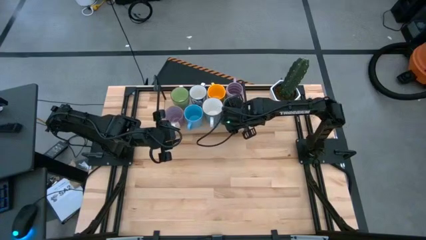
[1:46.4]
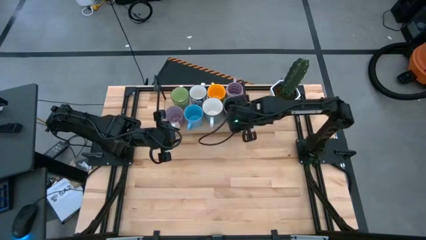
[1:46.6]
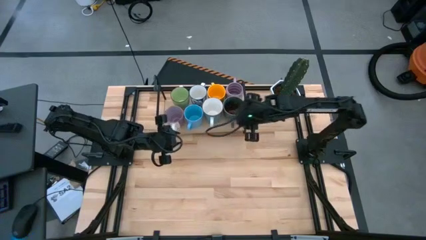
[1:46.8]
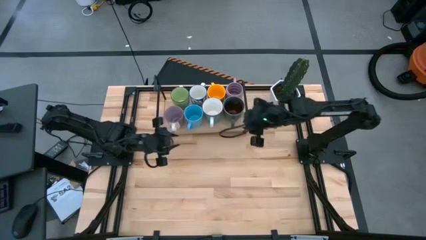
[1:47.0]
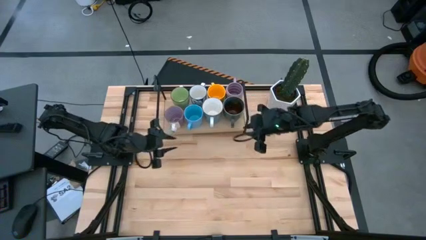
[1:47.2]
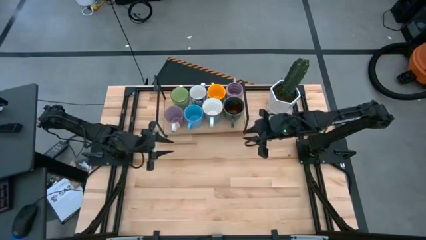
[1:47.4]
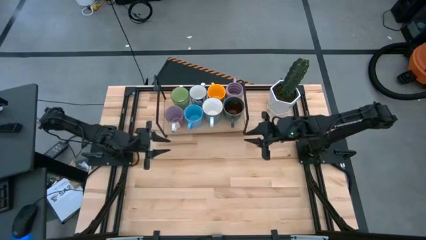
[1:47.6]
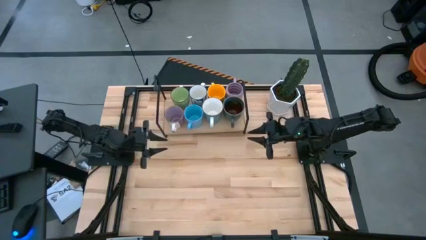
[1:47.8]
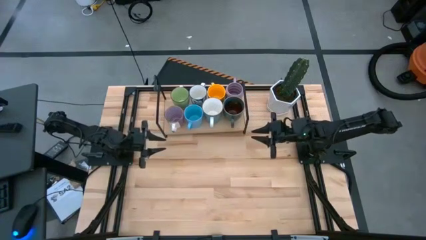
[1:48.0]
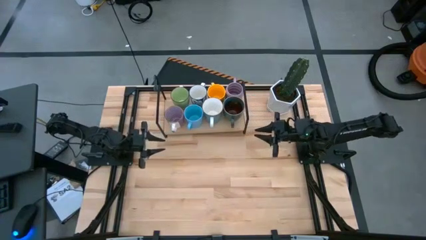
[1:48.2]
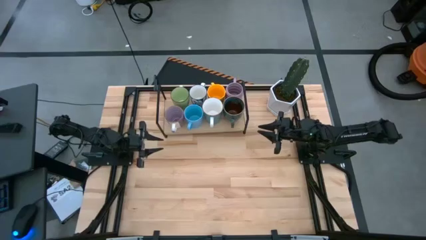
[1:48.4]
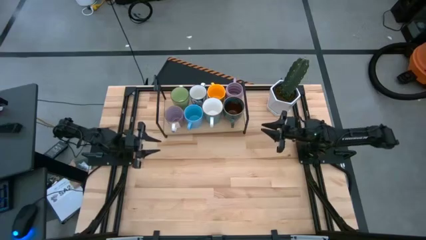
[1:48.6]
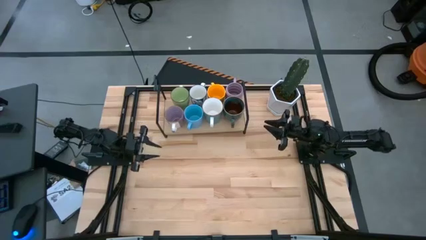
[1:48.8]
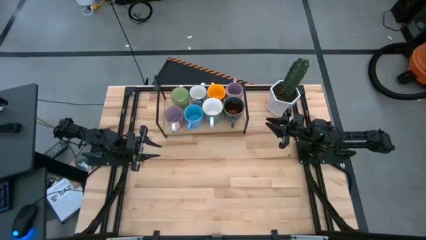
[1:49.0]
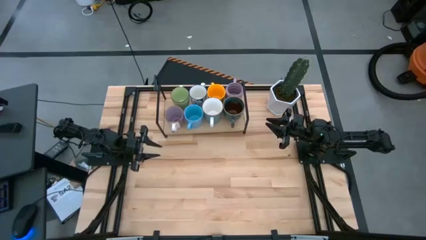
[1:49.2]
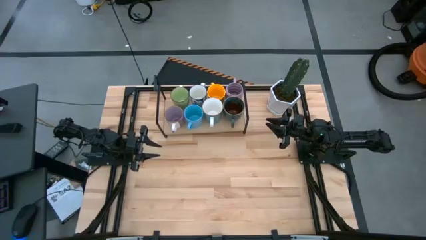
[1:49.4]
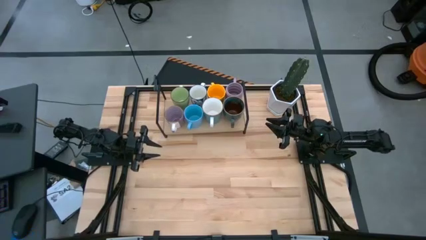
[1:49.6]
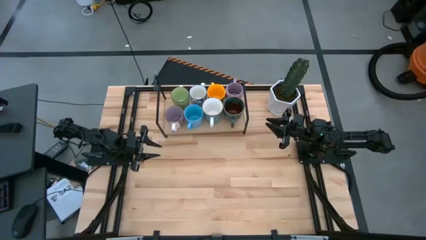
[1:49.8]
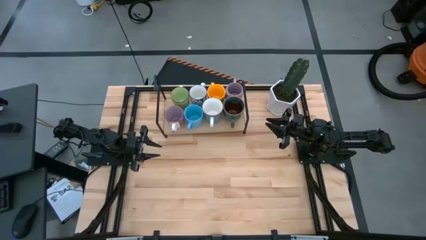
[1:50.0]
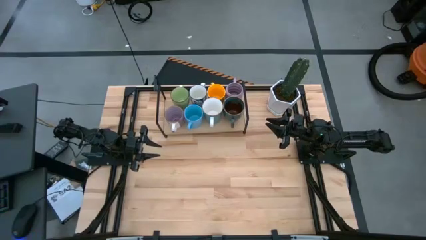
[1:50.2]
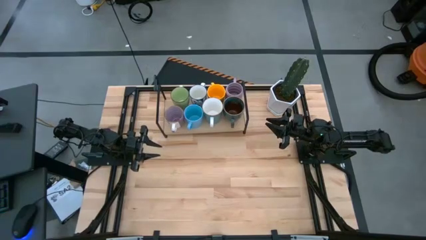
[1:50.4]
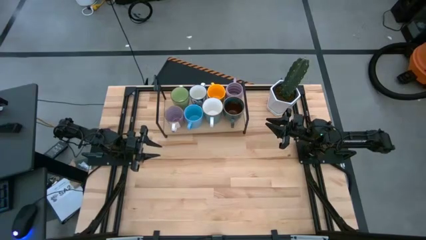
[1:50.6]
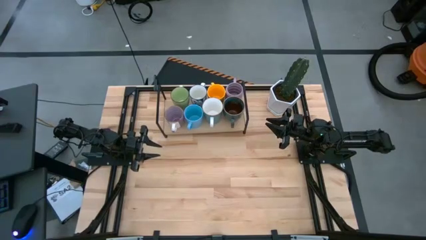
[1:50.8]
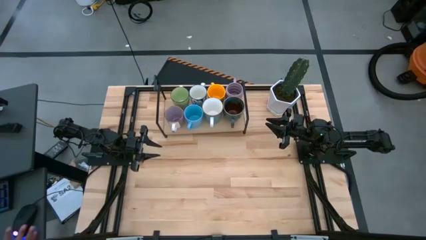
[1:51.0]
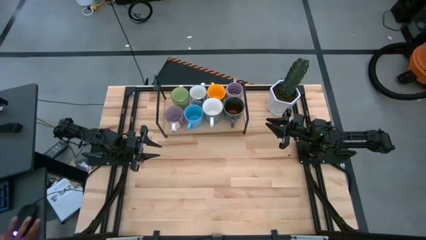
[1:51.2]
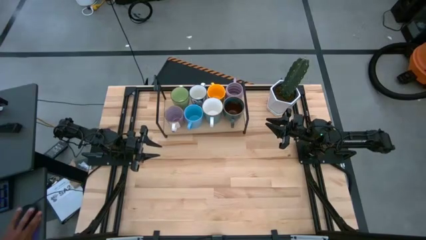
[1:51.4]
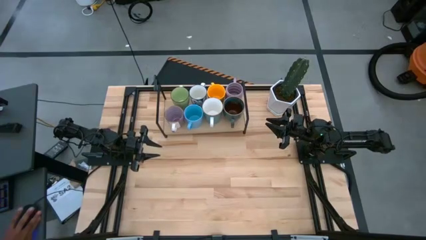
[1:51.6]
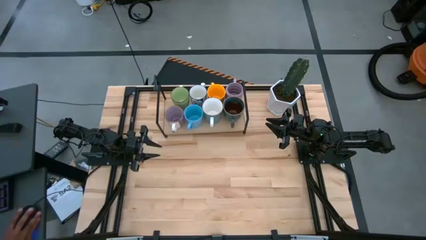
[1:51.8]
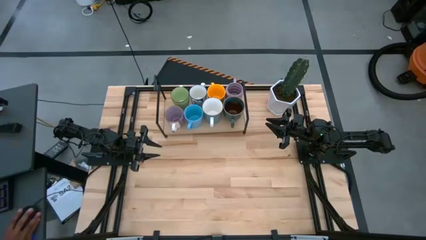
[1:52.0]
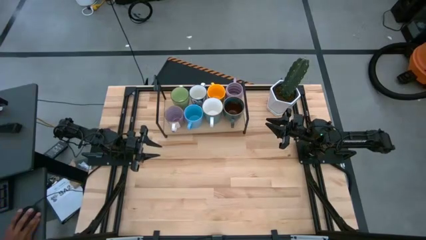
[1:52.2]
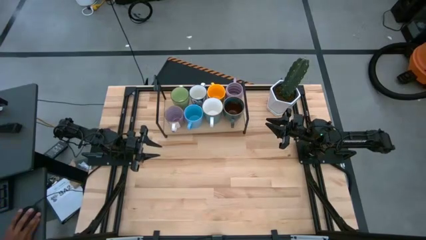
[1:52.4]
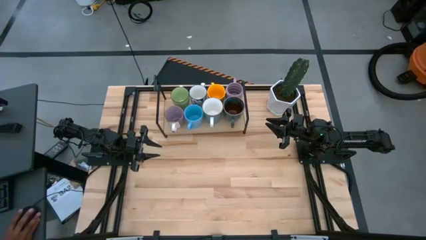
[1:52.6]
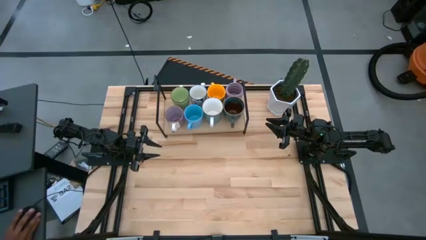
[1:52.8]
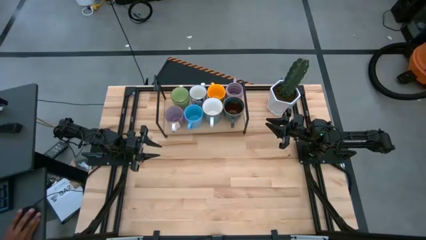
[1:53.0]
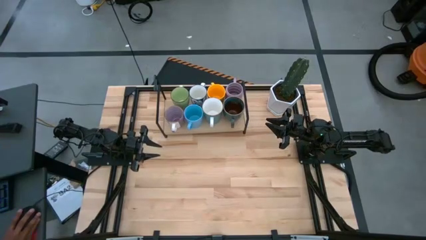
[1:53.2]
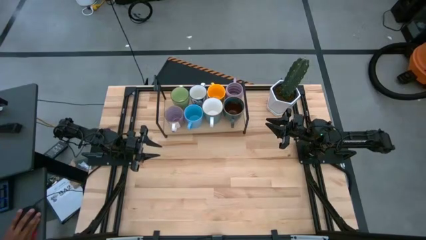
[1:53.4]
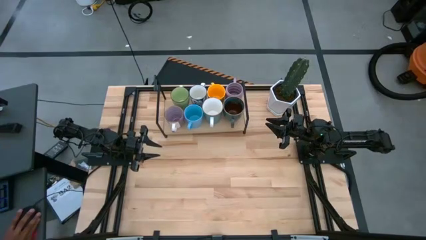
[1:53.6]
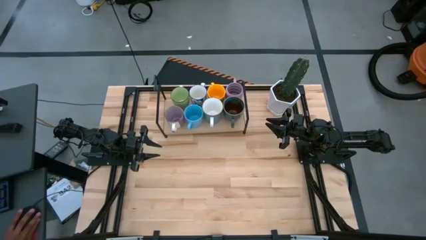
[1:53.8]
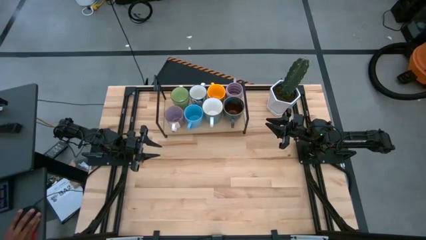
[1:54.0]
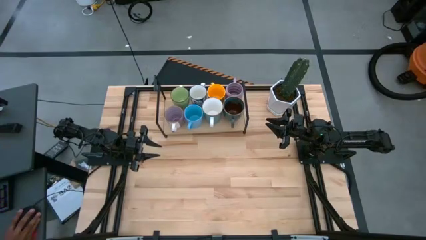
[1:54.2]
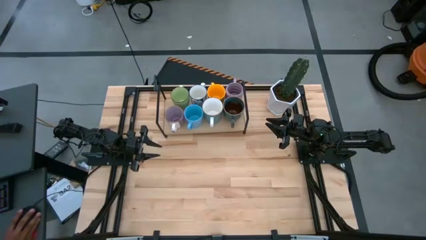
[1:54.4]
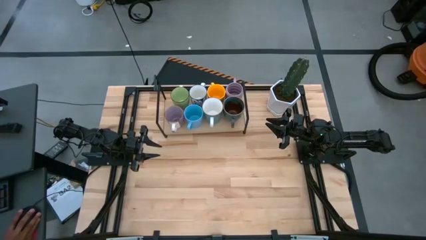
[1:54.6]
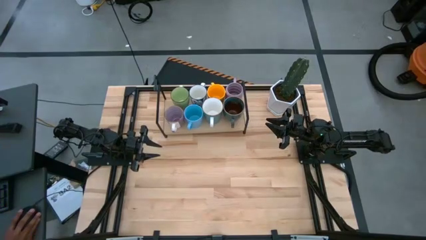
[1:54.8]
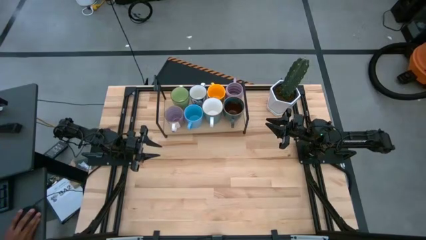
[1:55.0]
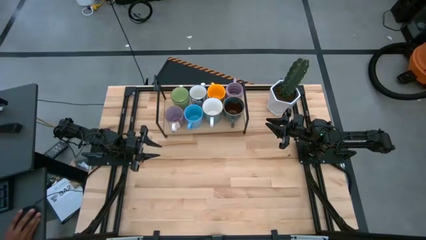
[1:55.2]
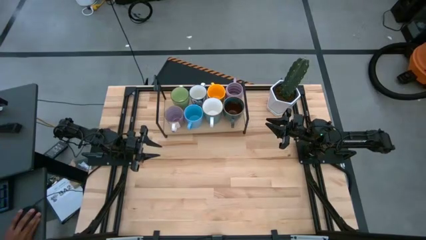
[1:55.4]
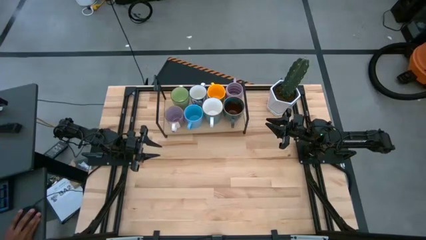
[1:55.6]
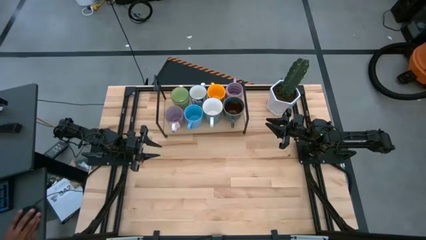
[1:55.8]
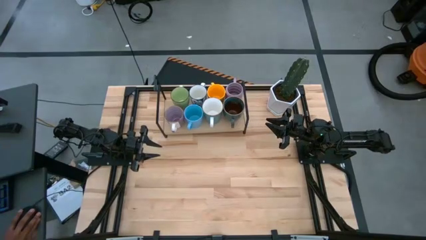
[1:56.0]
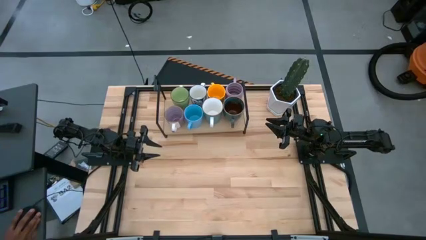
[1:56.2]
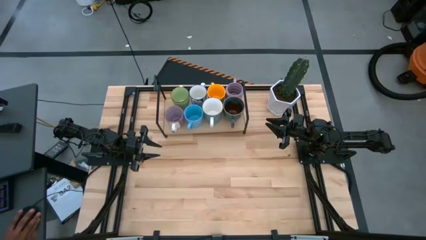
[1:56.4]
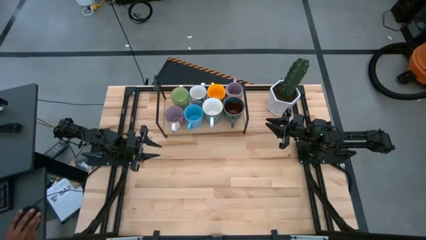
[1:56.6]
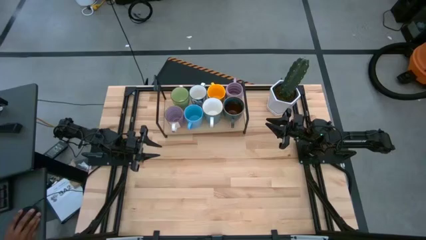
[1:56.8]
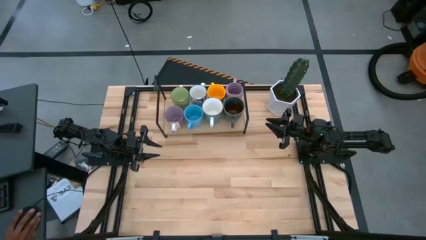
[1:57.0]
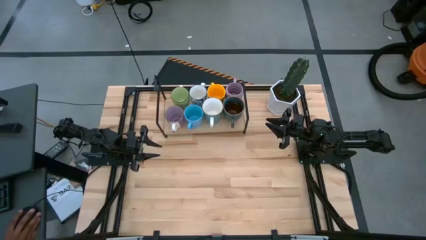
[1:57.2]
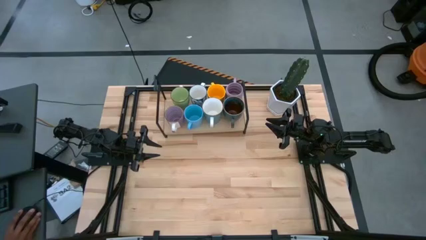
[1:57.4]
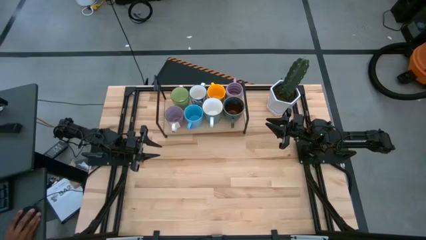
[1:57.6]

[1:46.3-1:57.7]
Task: Place coffee mugs
Return to Home Position

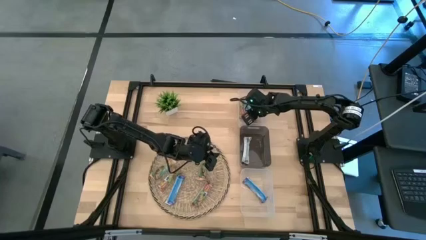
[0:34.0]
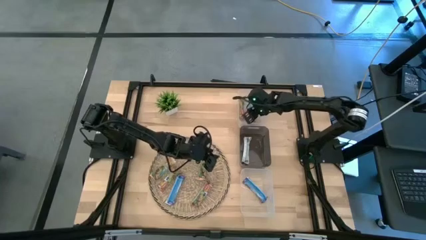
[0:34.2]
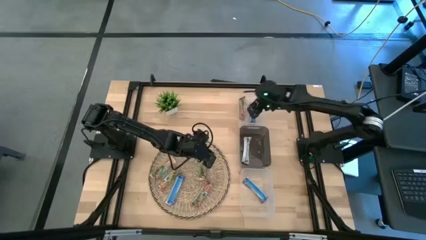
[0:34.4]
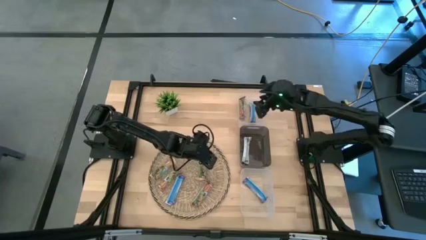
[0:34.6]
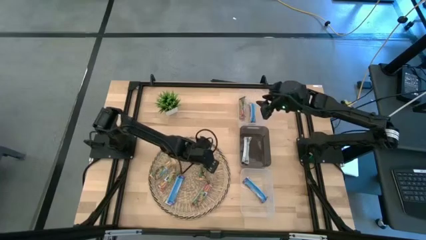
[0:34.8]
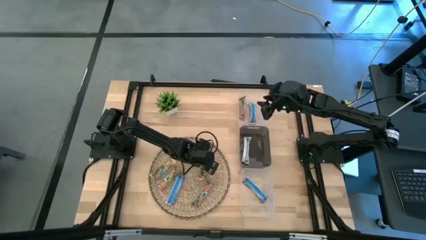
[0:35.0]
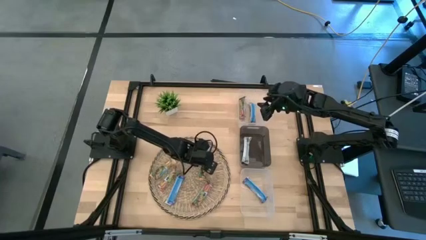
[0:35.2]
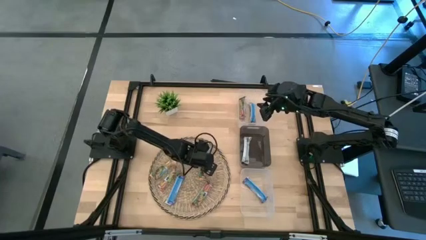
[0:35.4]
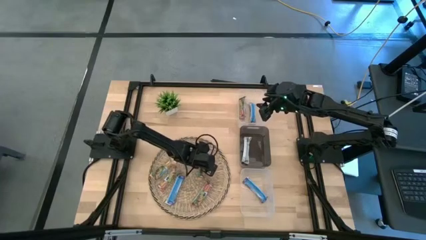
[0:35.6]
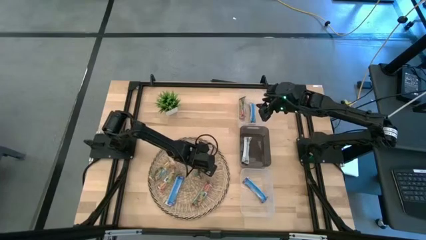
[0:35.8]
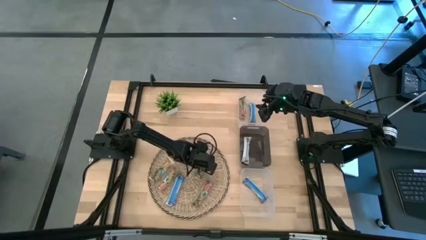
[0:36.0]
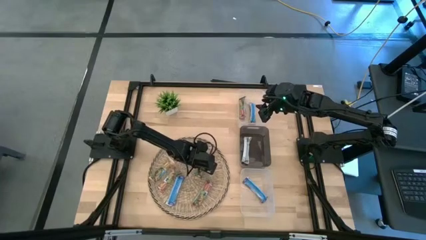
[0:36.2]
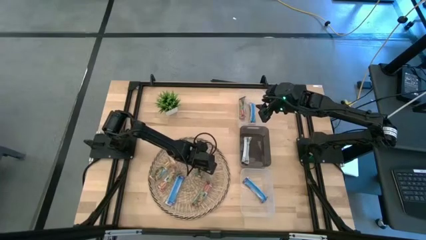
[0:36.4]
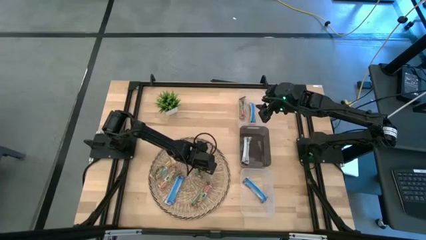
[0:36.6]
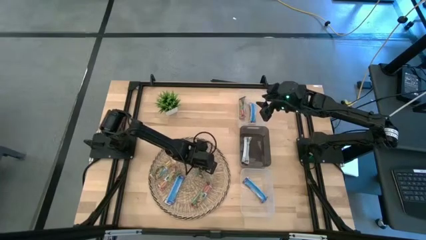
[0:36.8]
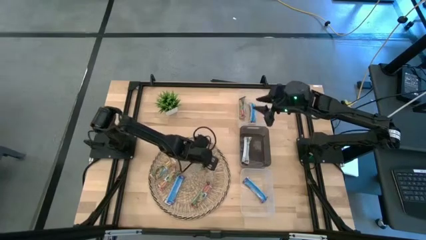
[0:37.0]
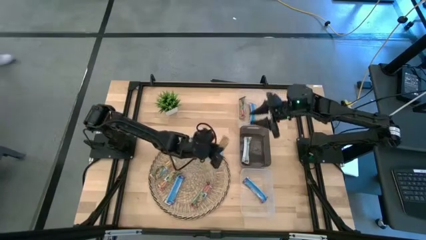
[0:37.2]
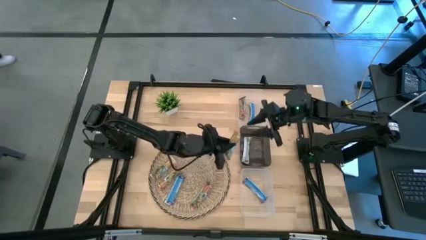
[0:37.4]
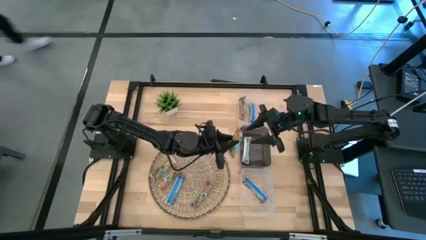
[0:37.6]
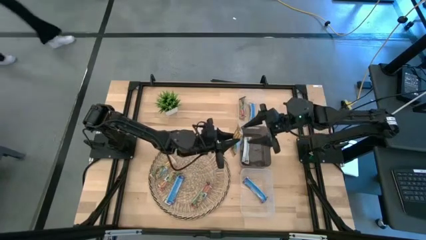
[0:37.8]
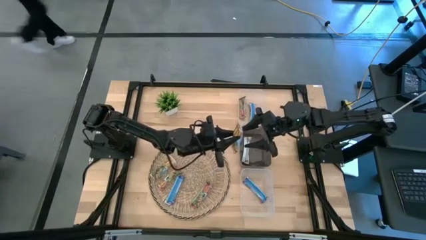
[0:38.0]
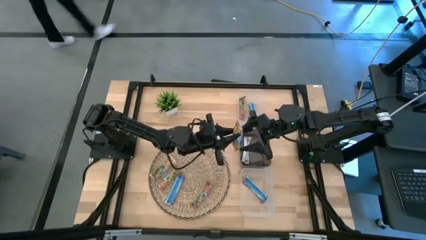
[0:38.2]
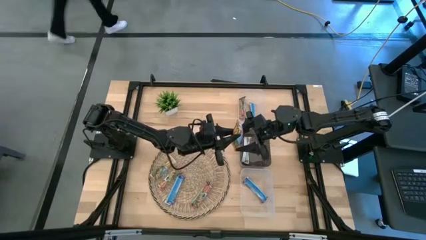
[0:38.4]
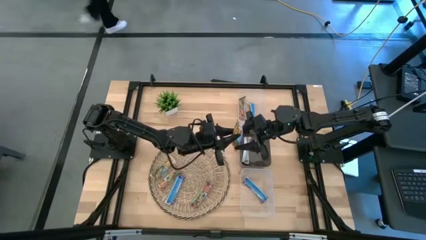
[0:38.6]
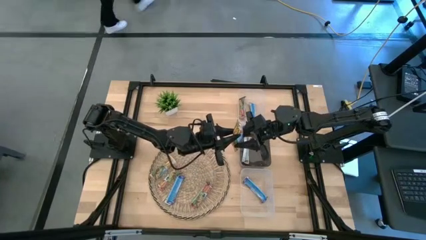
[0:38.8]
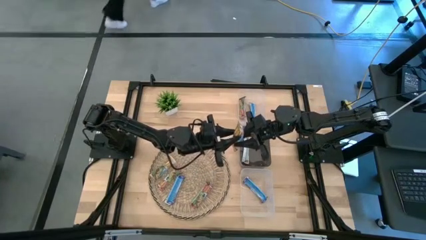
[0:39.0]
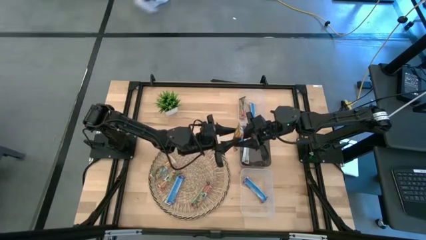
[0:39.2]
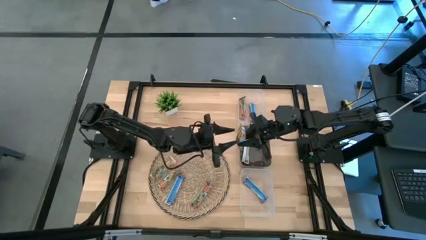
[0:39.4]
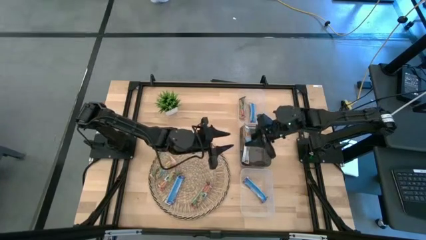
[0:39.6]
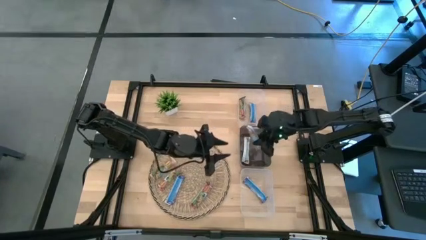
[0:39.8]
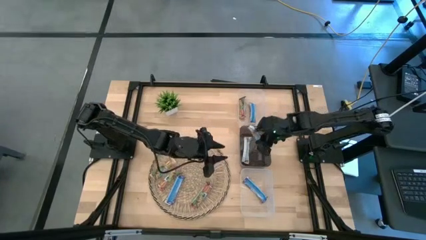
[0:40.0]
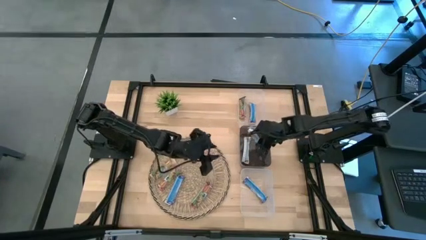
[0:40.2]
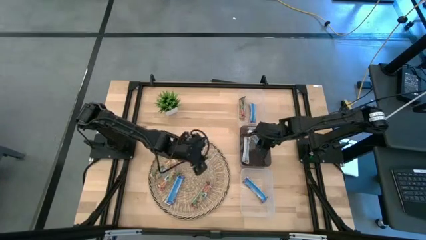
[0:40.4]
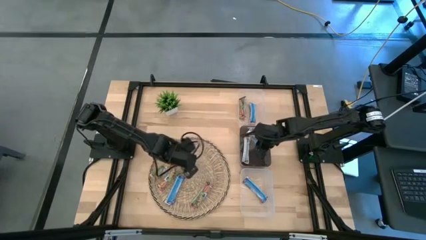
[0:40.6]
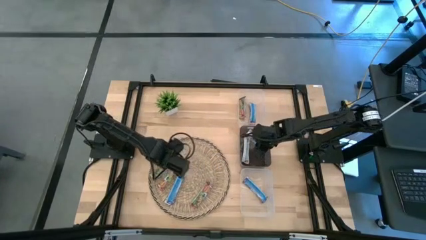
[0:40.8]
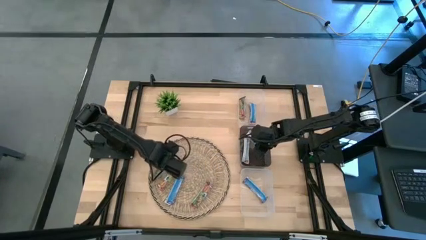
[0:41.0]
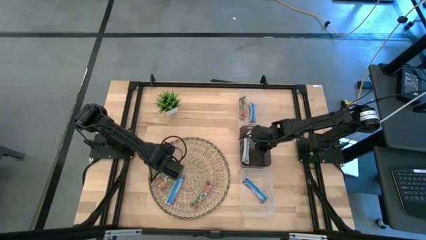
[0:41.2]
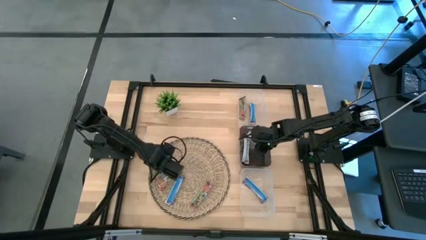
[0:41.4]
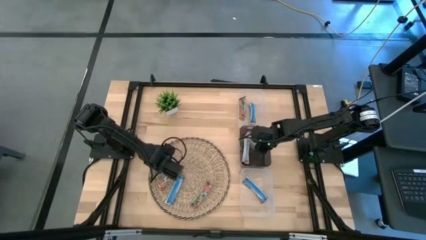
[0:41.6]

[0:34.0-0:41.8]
Task: Pick and place Granola Bars by type
Put the yellow granola bar into the black bin
